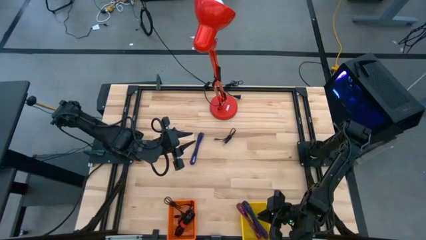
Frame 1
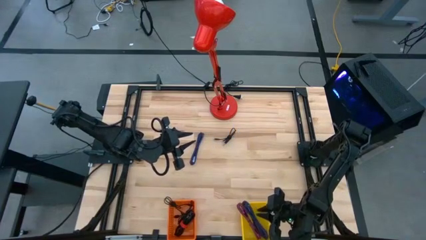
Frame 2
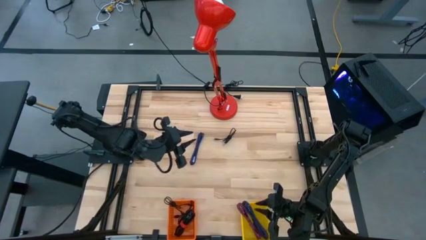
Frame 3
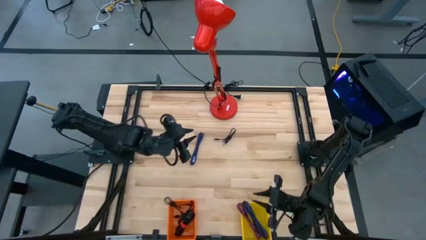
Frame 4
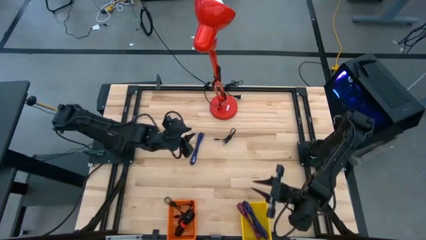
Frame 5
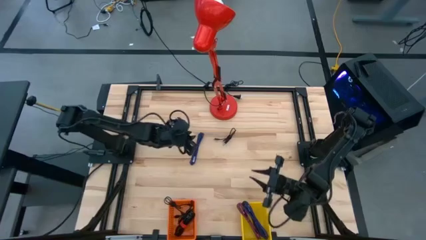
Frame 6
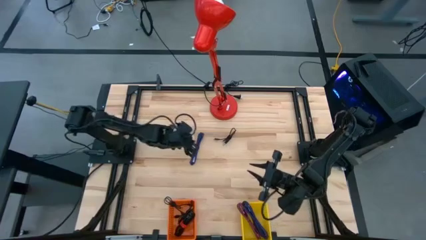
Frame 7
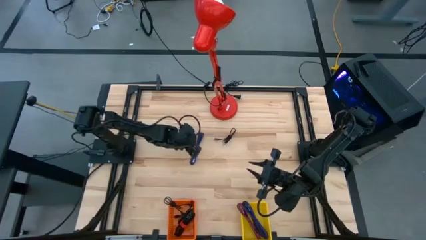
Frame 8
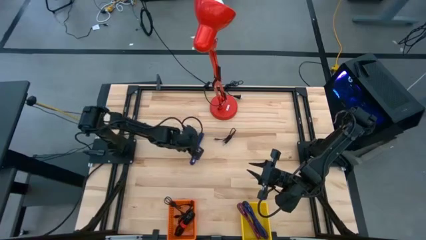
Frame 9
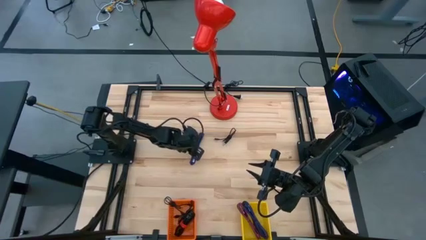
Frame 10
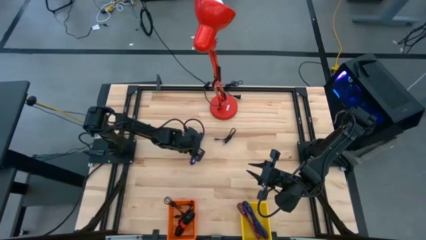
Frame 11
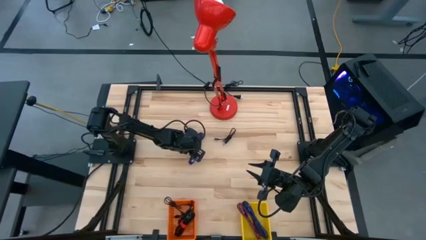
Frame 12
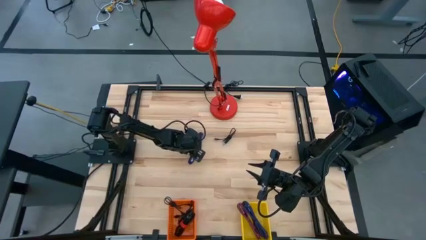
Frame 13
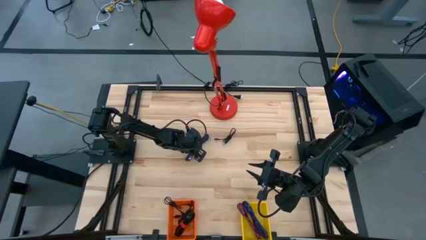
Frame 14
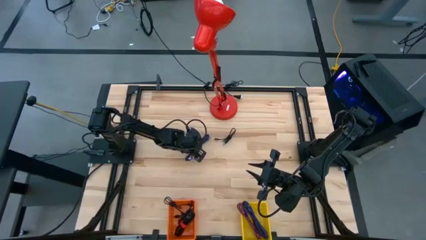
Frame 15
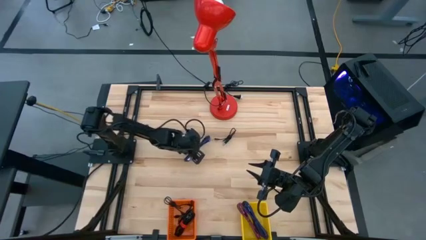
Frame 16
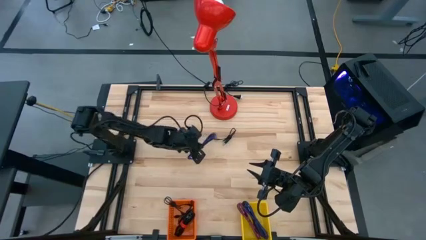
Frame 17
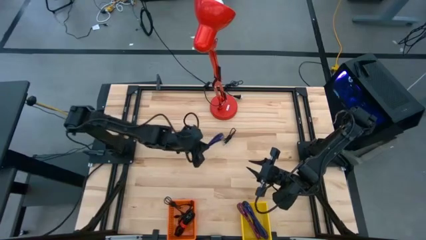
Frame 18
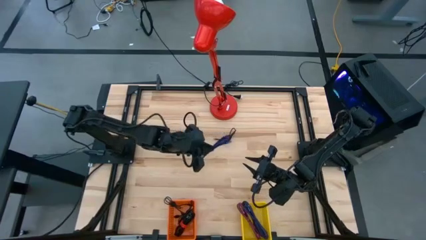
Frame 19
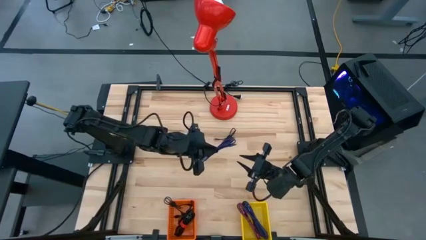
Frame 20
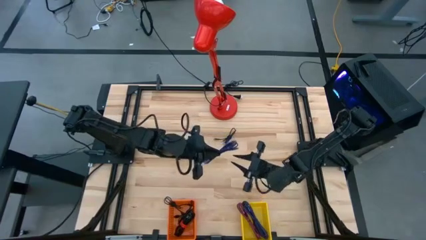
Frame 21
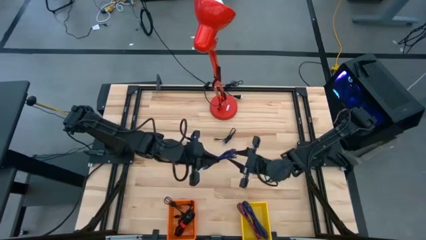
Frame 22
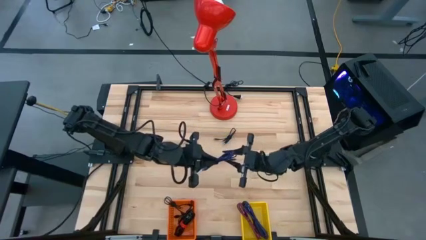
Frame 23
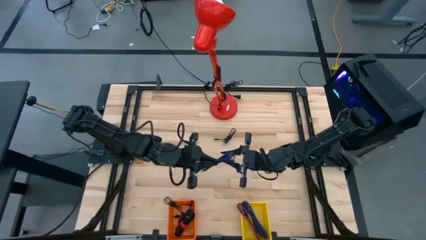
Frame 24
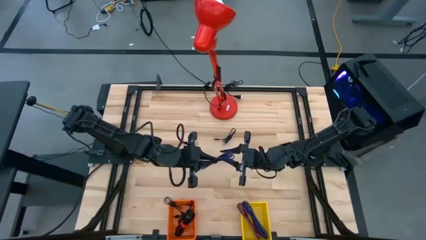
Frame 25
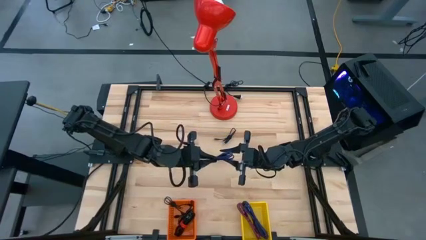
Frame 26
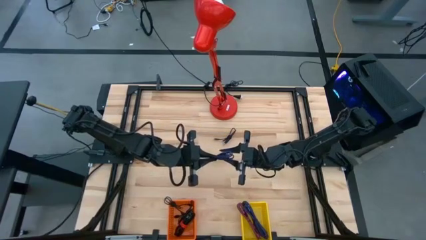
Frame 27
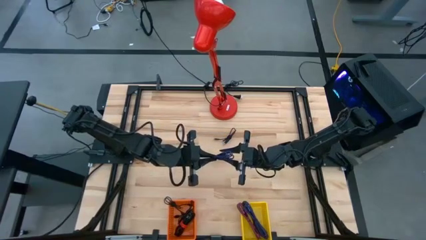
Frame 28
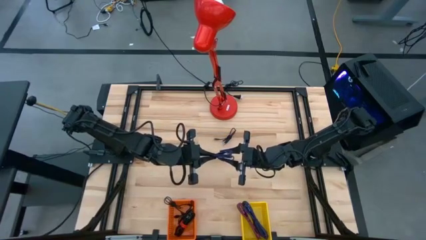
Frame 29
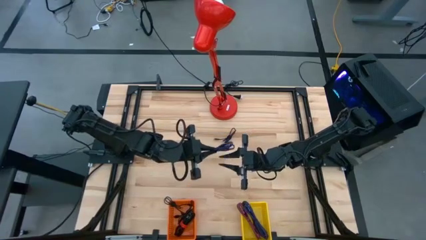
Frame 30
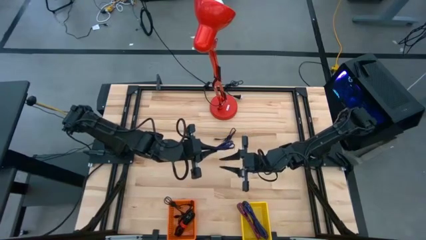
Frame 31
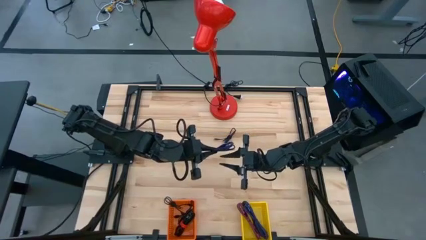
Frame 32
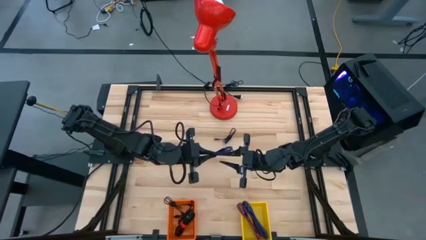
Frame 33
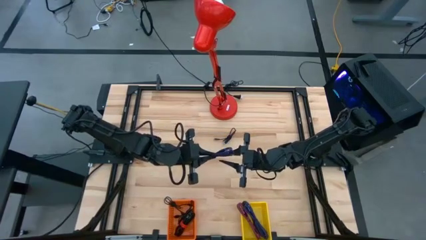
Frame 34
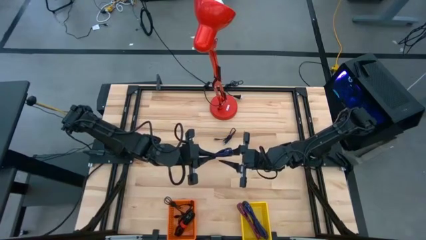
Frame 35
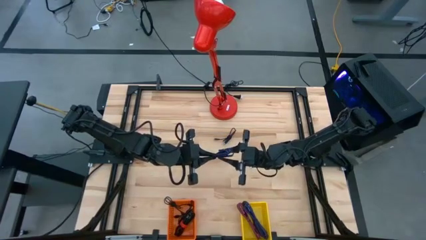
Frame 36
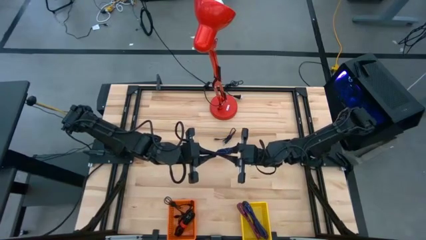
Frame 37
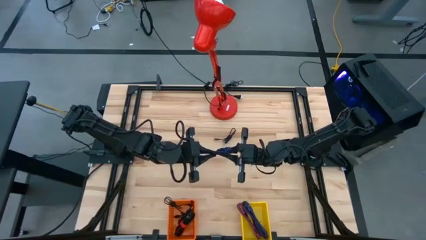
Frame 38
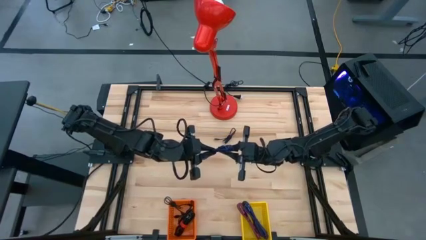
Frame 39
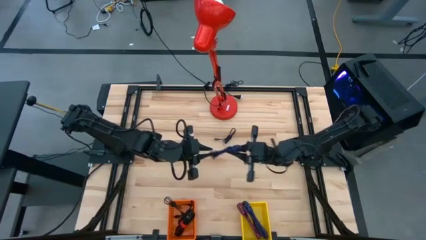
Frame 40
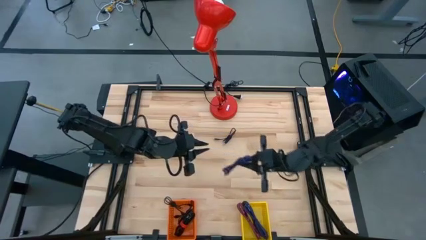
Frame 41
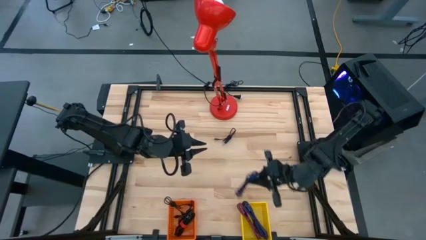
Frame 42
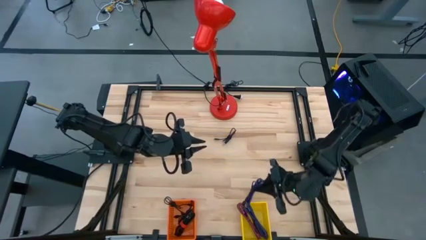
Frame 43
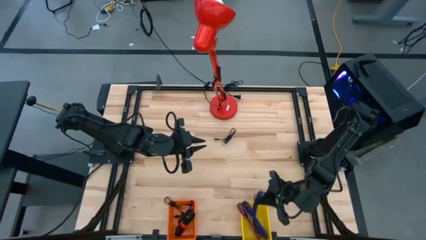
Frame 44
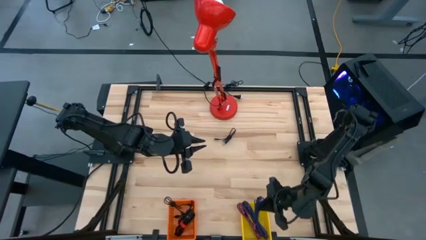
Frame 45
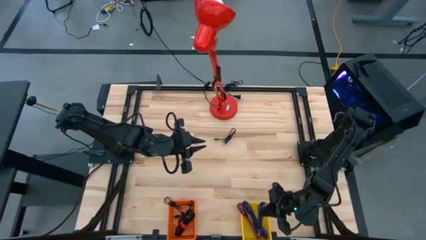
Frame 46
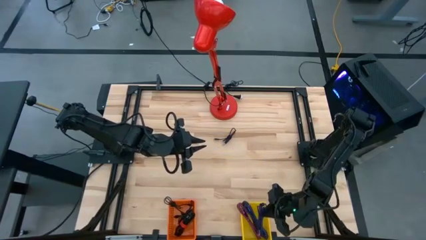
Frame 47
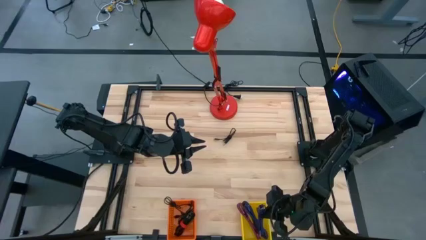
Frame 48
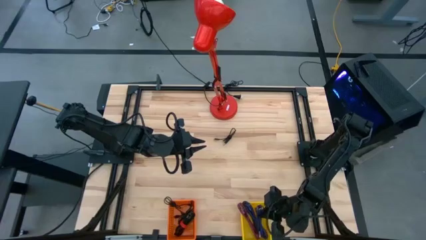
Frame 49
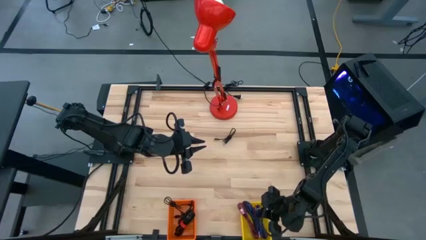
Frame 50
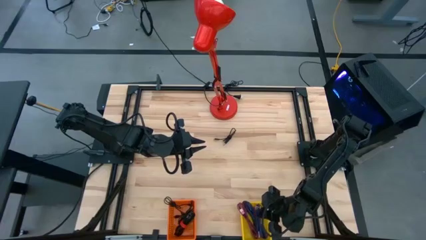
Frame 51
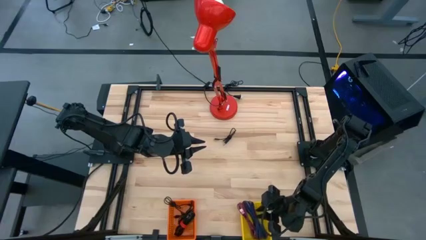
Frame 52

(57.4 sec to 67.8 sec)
Task: Pick & Place USB Port
Put the blue charger cable into the yellow bin

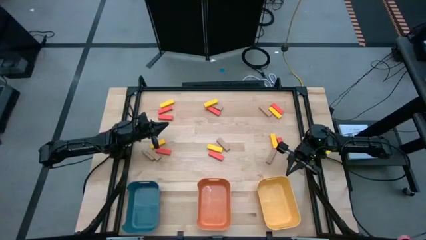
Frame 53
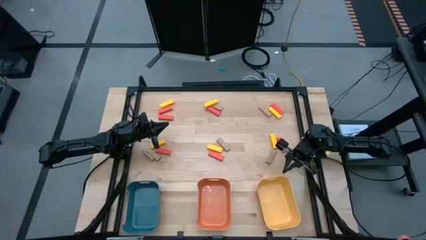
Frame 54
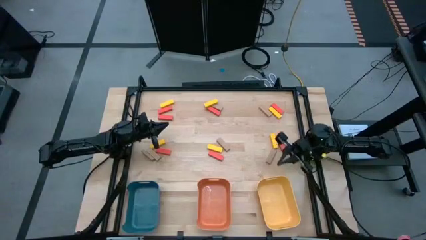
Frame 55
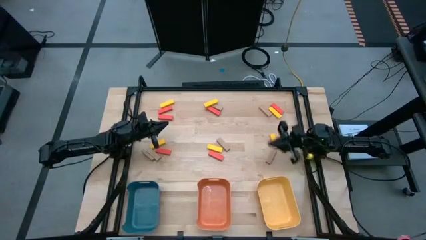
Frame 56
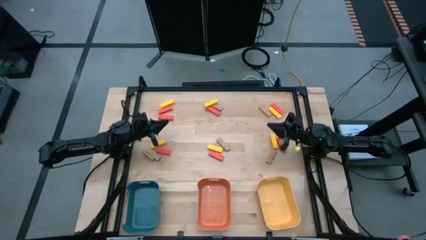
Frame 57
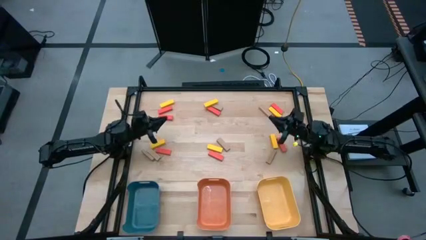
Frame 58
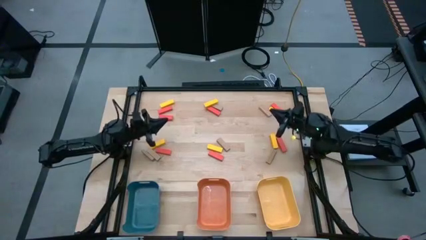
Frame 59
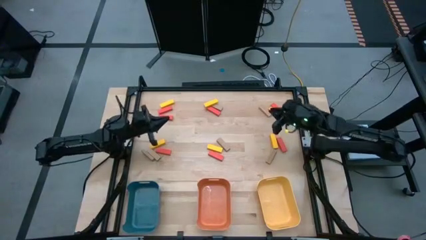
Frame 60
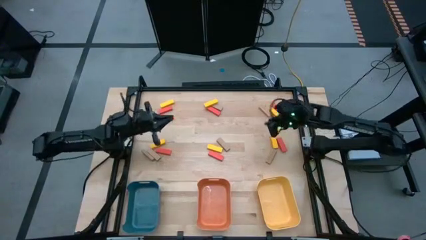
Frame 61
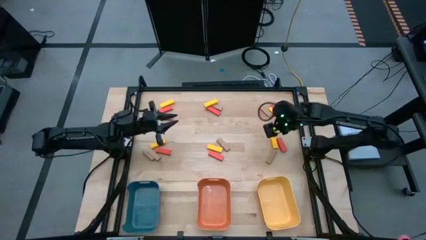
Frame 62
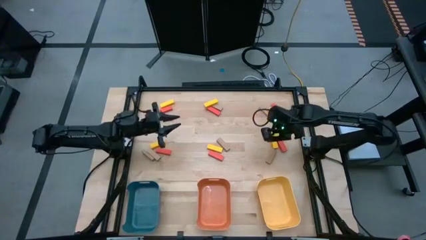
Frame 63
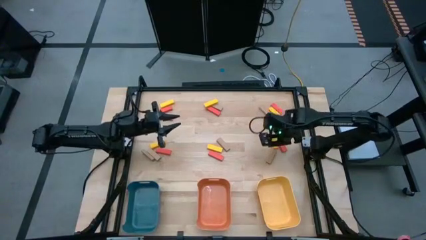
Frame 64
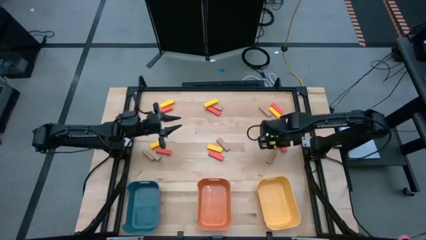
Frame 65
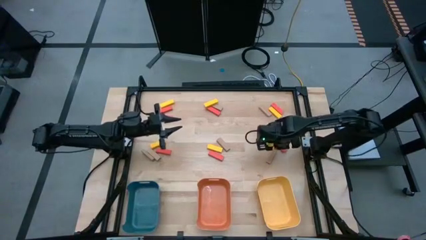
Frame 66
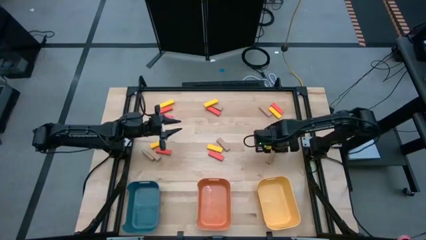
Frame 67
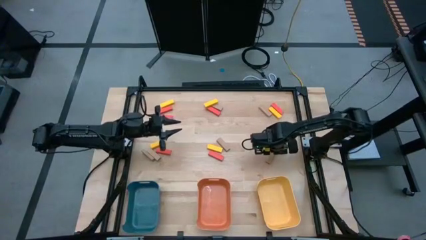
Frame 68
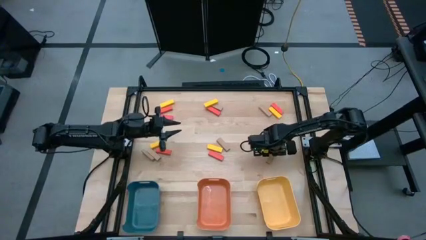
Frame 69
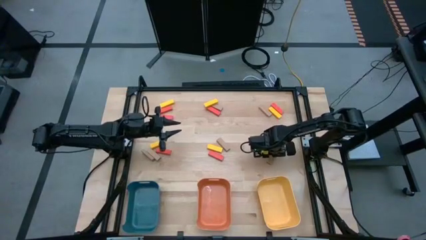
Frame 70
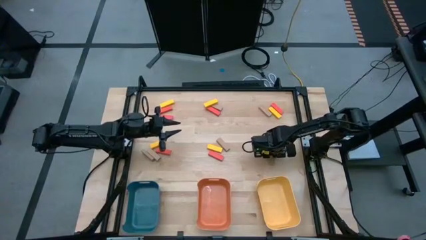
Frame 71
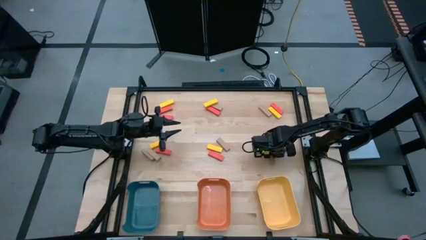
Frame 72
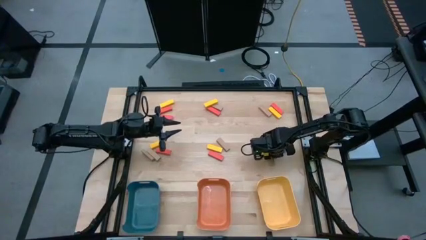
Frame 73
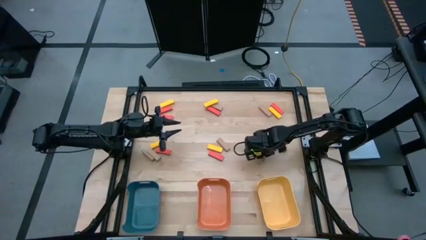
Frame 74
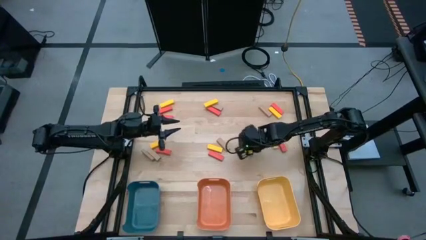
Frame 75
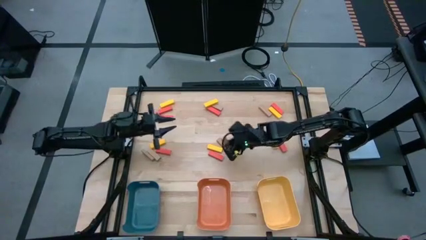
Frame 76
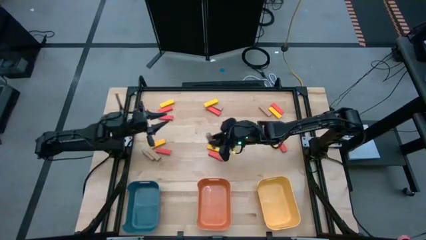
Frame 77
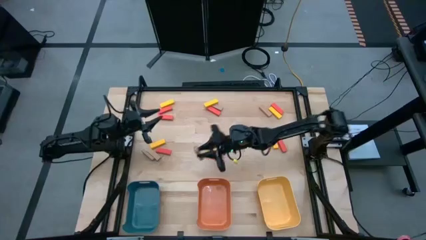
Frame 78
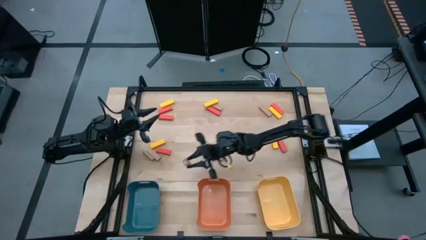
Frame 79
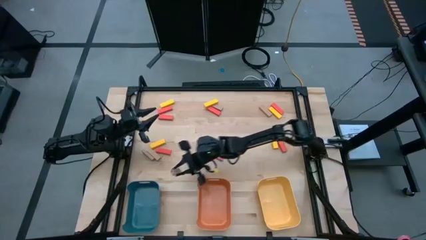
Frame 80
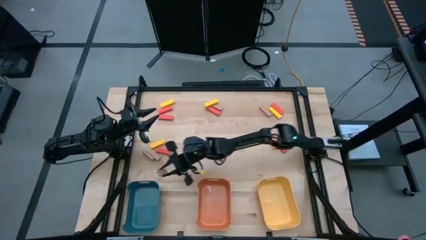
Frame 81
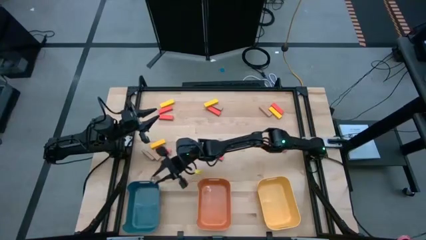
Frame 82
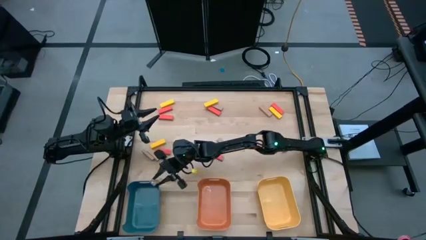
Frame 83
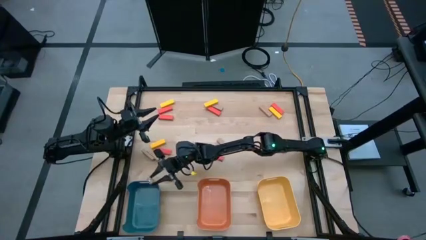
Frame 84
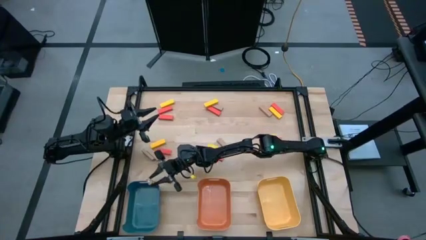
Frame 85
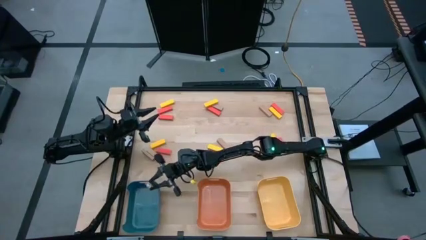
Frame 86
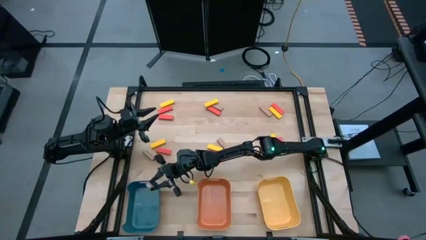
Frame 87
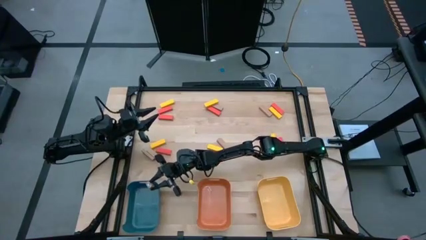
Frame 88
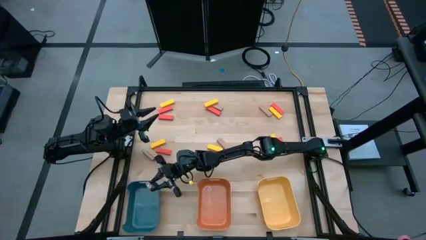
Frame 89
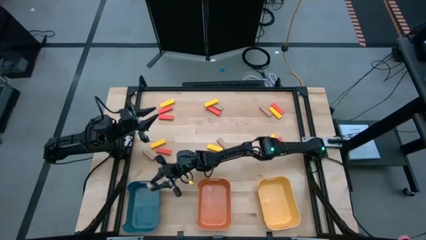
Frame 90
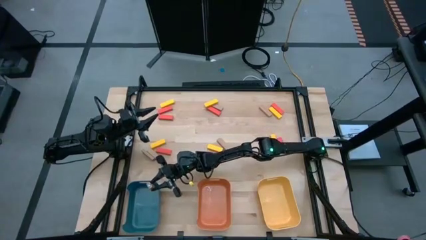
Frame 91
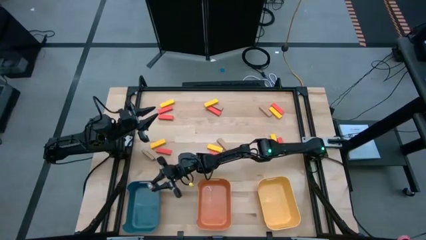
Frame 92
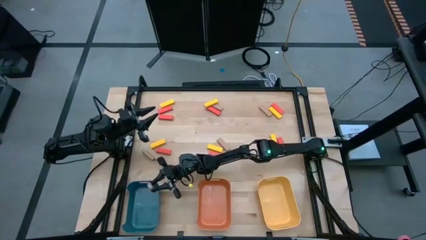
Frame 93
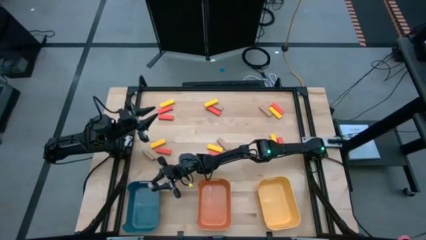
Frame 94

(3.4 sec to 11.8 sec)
Task: Sort blocks
Put the bottom right brown block into the blue bin
